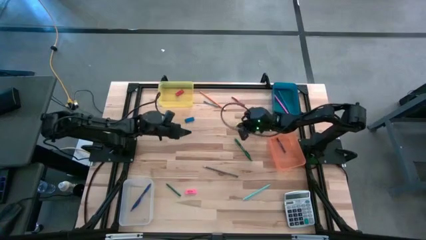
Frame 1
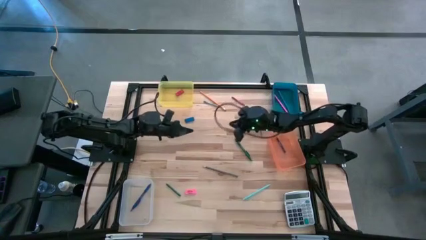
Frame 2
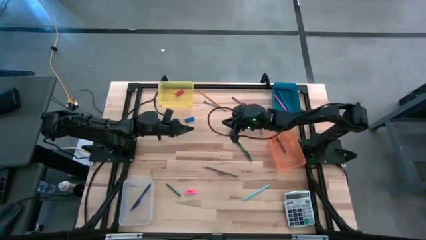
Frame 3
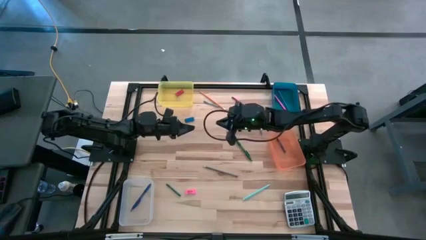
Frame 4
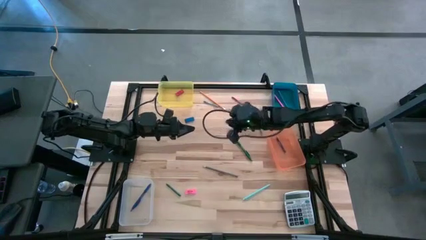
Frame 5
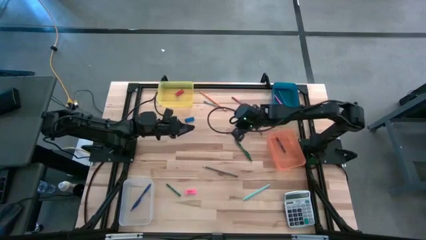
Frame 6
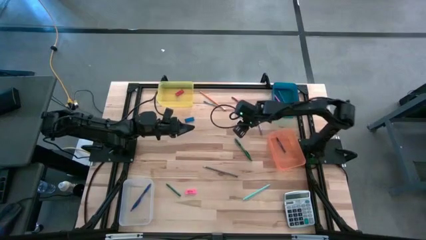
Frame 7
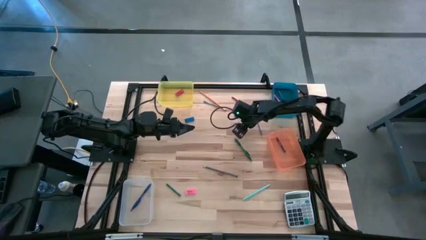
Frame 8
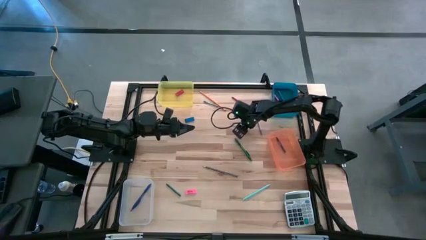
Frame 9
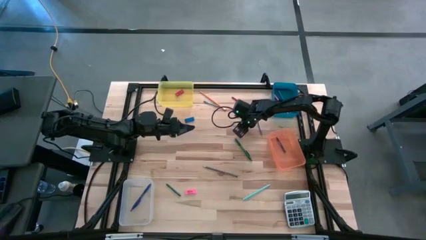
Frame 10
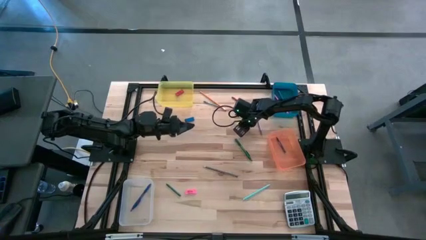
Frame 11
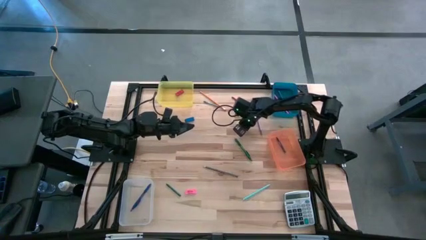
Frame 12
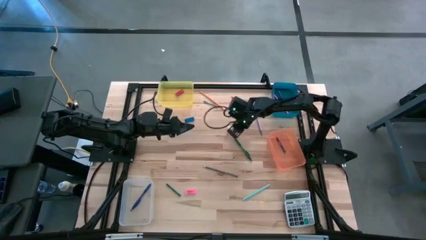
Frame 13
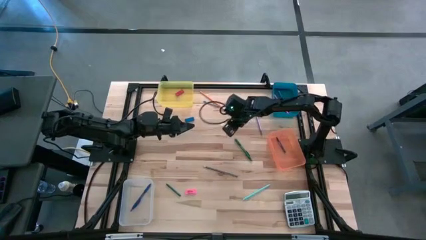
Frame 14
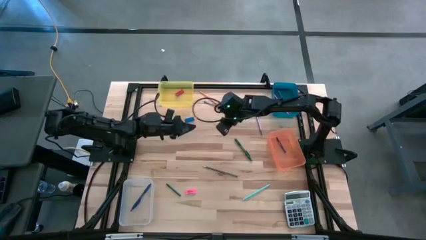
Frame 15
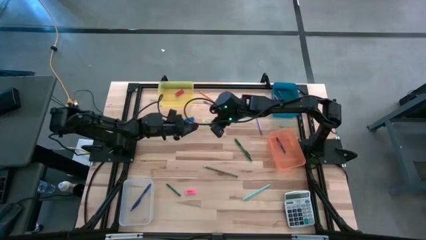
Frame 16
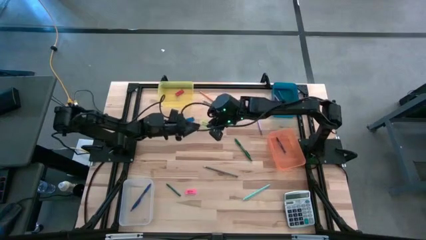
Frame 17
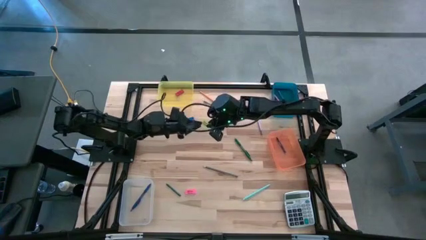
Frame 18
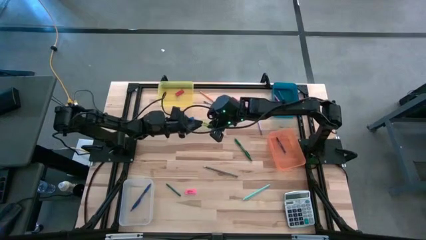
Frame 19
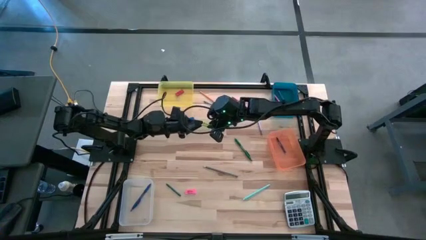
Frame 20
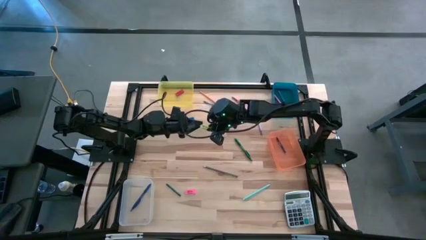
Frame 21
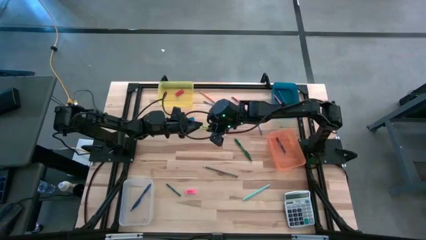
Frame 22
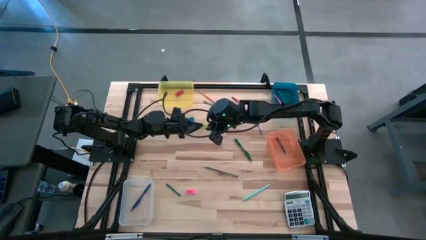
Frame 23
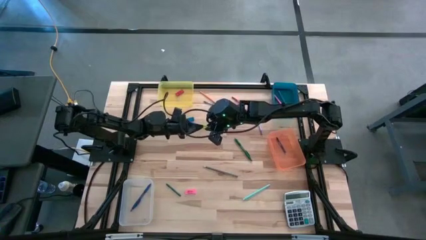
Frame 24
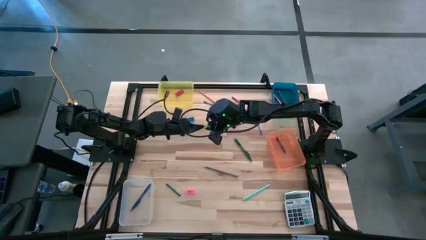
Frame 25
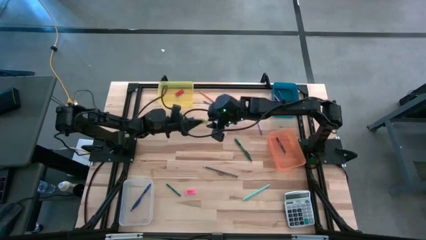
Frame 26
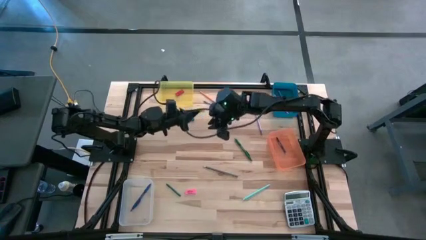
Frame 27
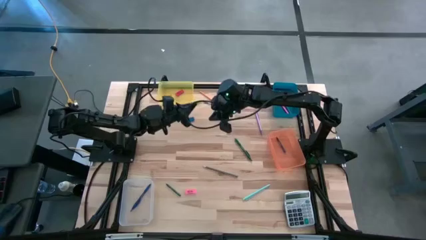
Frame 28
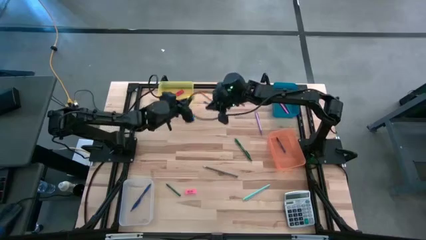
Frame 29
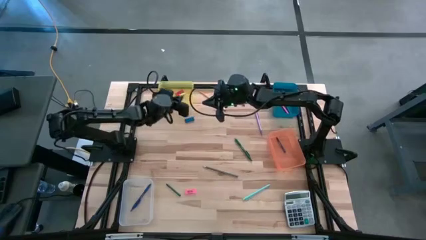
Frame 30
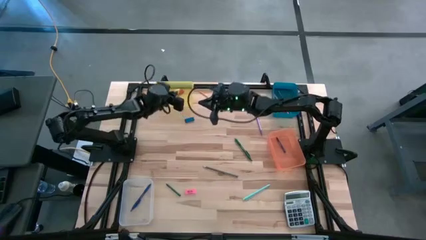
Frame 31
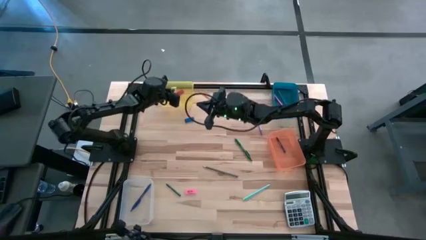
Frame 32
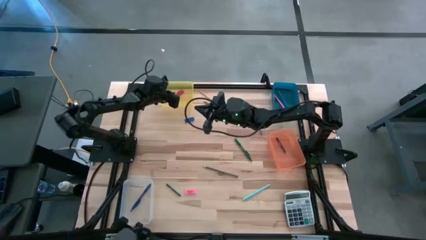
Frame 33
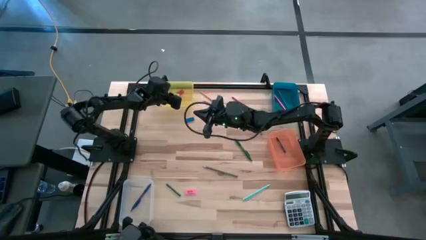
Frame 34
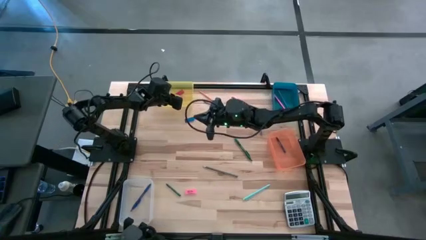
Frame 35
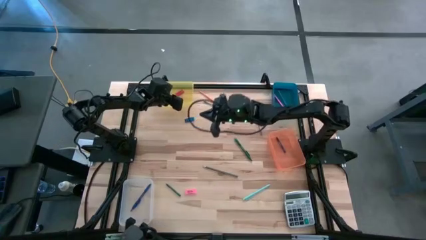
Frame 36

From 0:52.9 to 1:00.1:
Task: Sort crayons/erasers/pens/pencils in bins
Put the green eraser into the yellow bin

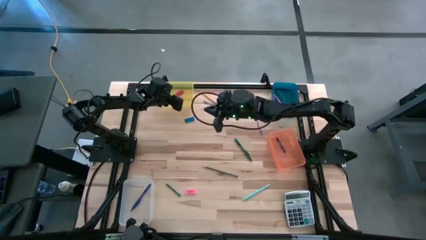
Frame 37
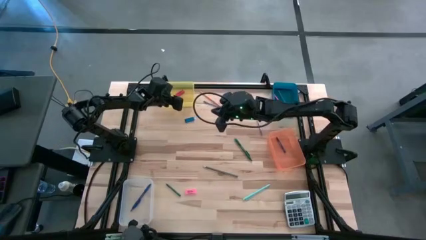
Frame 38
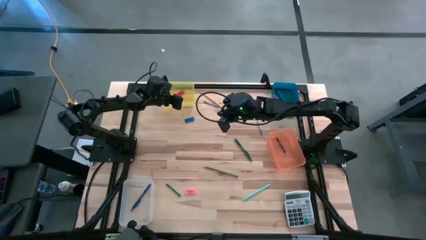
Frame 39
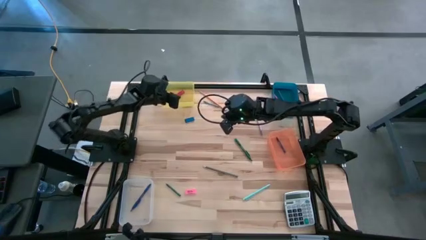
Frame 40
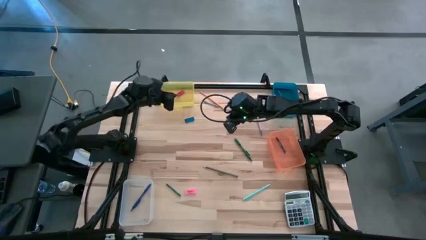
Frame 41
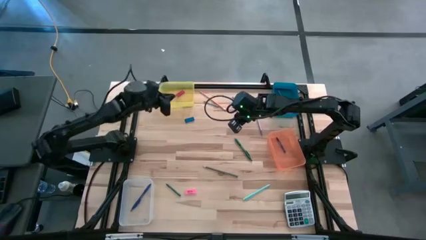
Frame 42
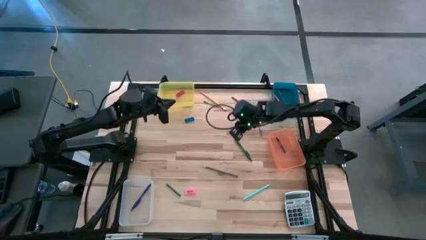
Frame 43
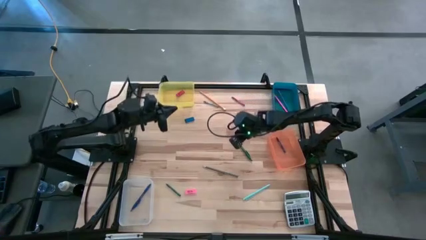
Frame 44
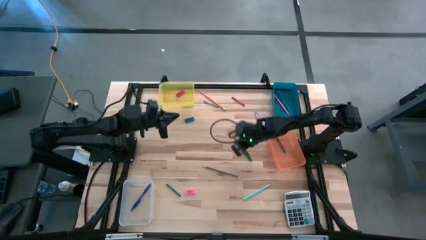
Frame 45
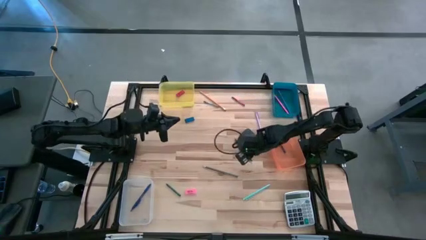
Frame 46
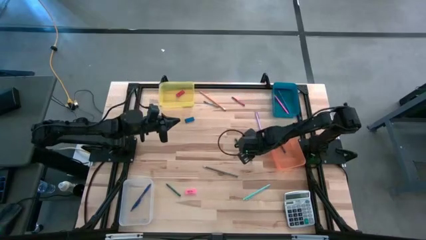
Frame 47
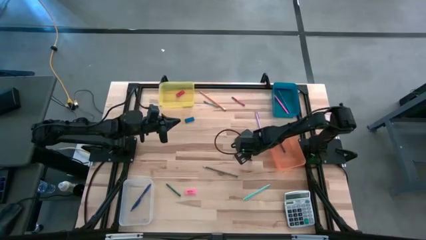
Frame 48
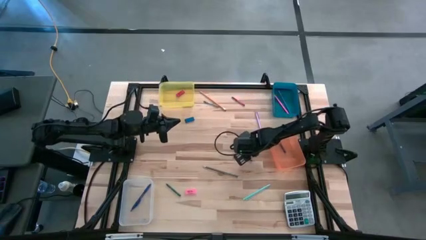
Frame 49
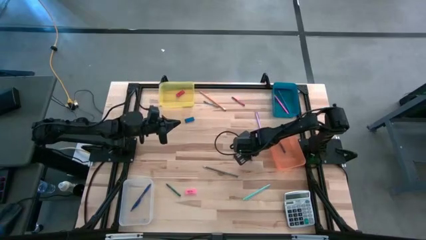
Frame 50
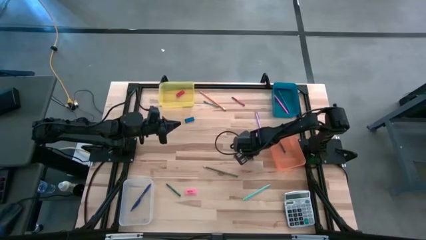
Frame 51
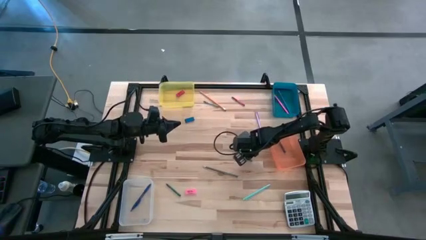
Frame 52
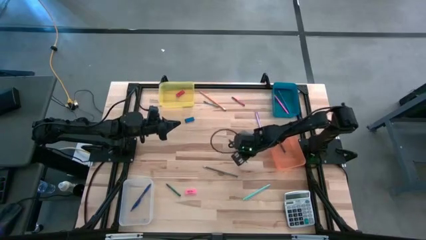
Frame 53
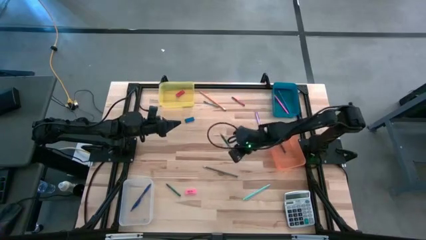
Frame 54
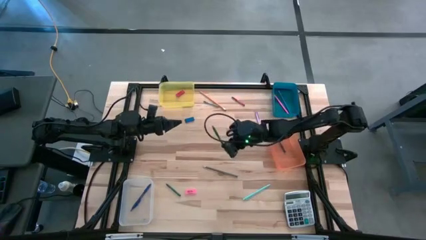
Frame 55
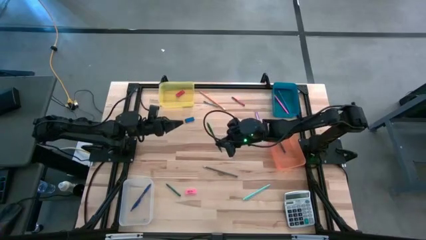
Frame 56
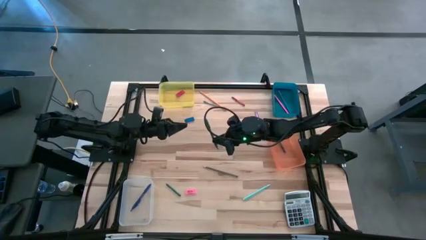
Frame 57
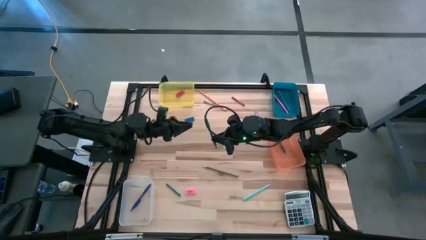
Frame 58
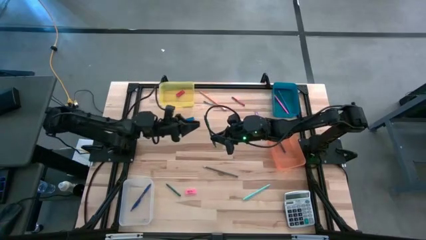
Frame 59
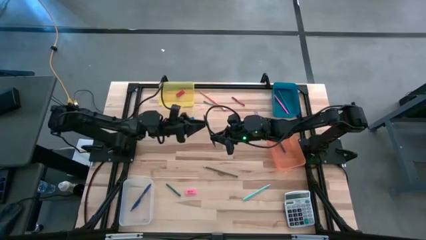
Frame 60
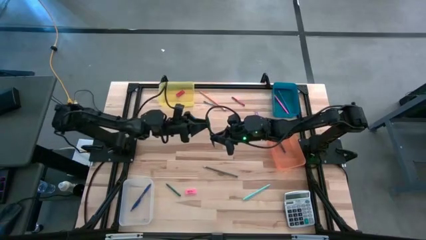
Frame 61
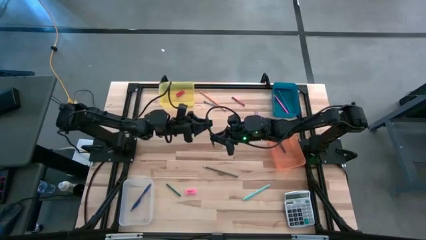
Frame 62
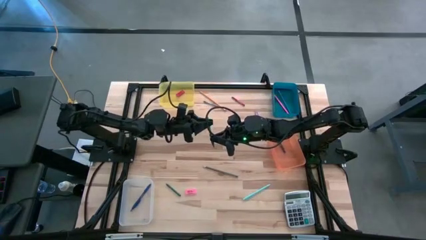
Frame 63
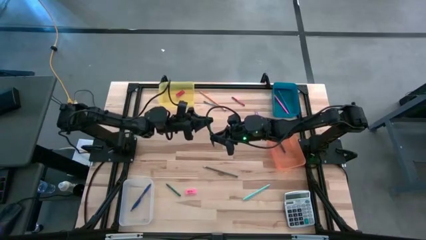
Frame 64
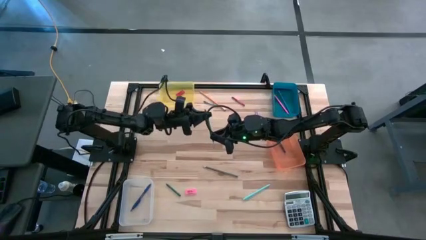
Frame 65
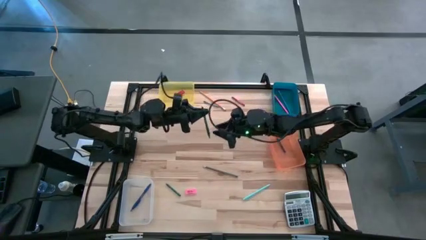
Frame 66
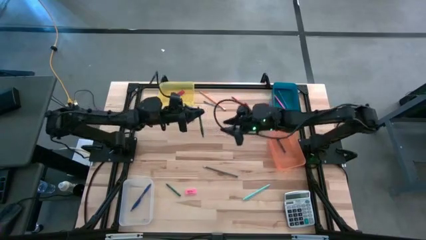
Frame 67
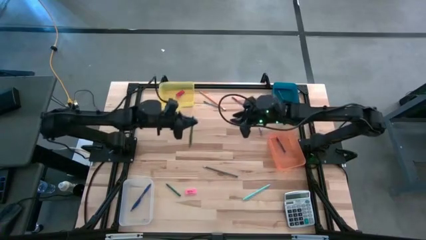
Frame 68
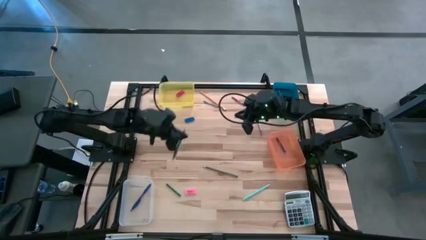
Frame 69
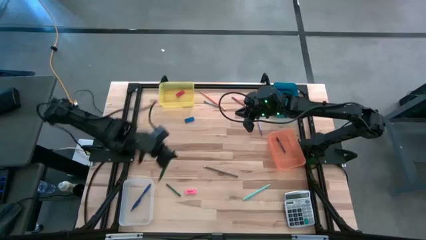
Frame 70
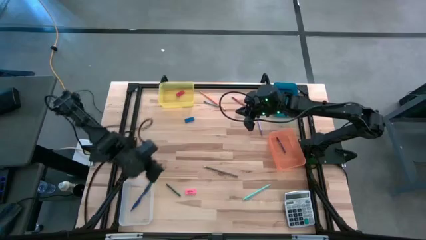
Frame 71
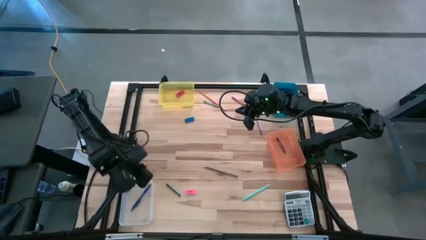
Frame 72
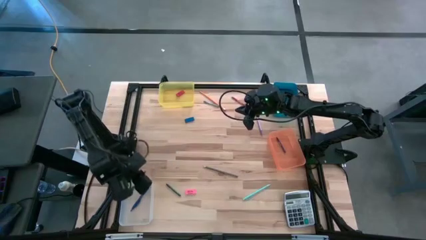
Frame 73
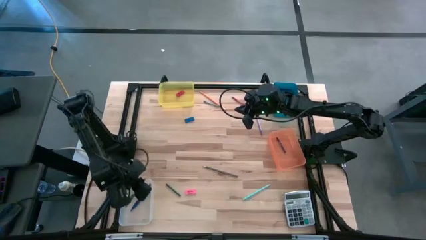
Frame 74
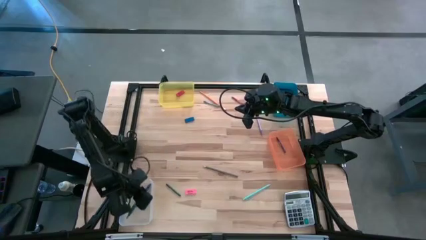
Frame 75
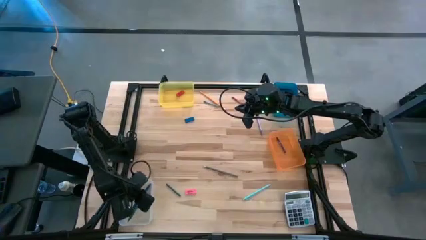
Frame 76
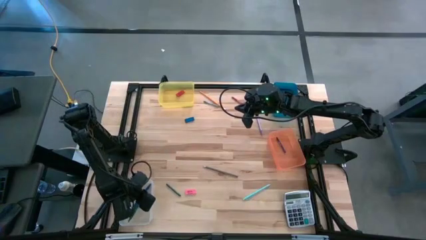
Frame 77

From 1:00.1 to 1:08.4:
Put the green pen into the white bin

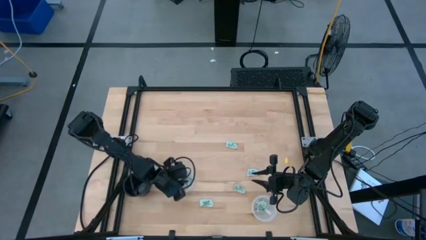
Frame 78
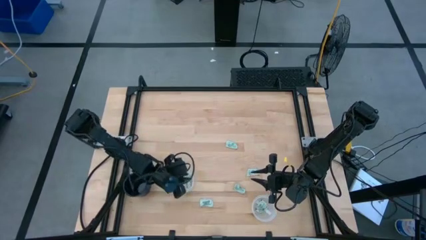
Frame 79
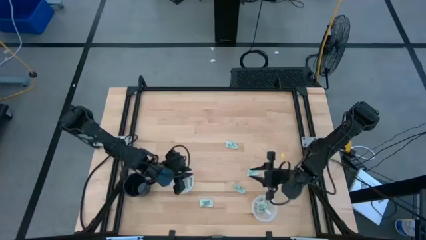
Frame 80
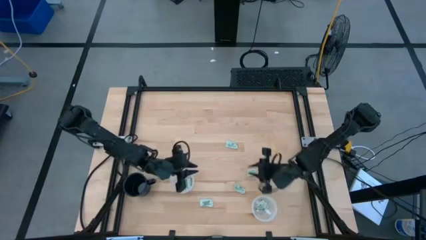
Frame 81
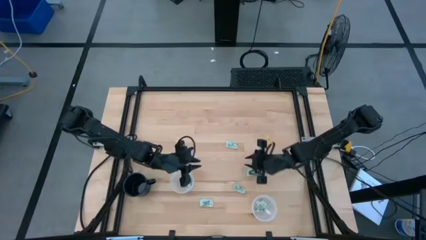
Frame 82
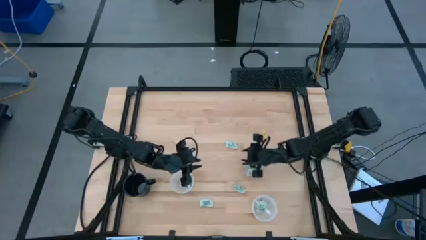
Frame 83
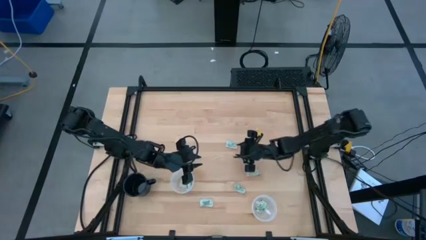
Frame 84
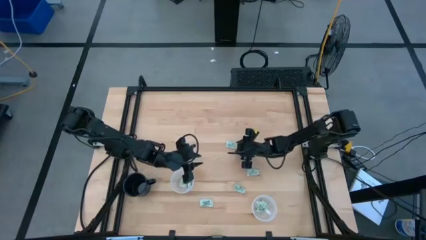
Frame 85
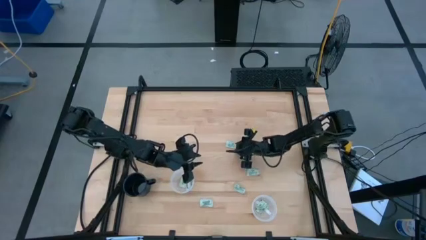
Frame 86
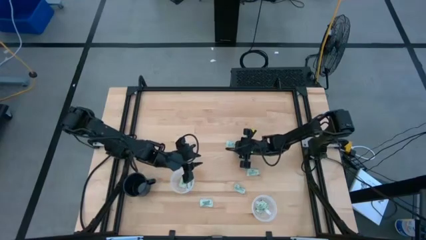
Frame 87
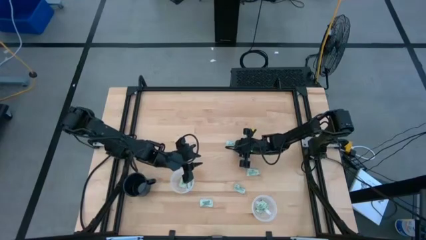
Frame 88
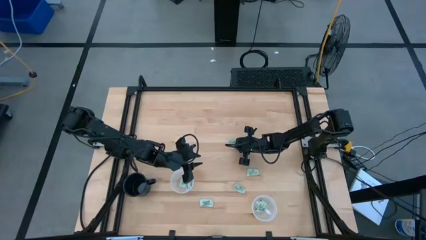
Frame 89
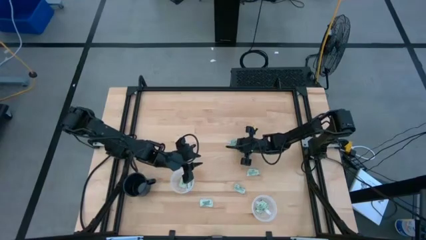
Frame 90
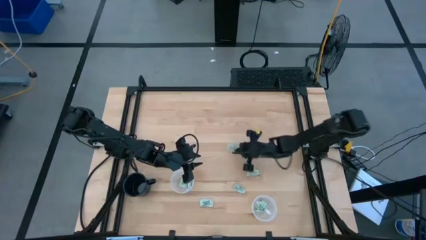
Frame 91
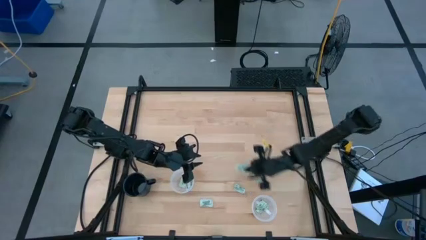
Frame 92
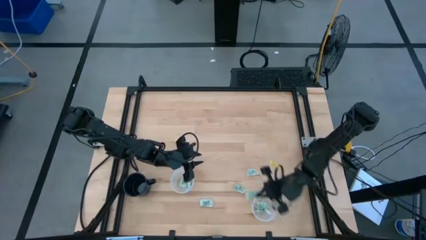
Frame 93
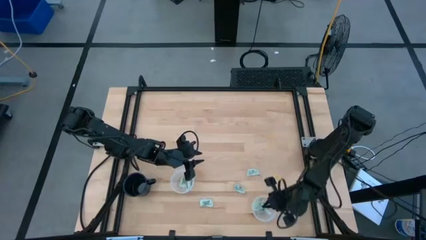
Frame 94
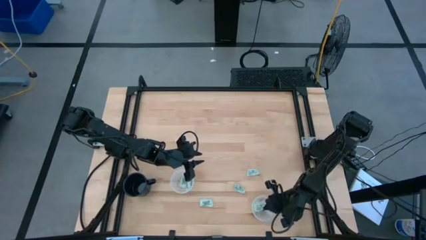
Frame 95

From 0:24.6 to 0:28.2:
Task: Pick and place items into bin
Put the stevia packet into the bottom transparent bin
